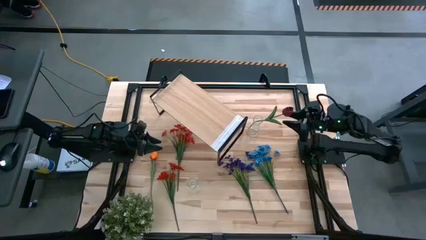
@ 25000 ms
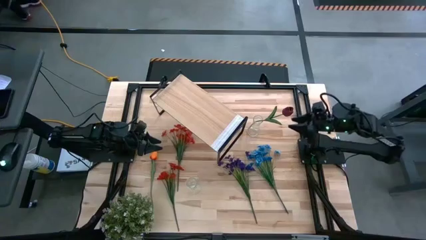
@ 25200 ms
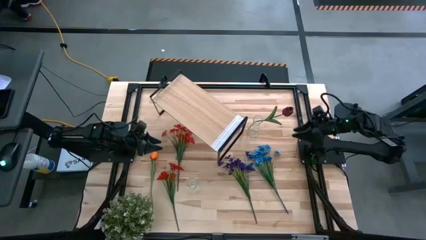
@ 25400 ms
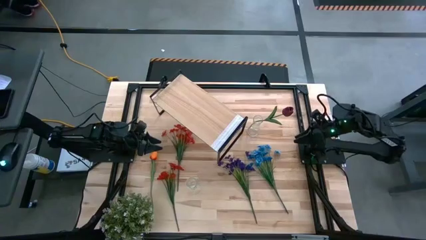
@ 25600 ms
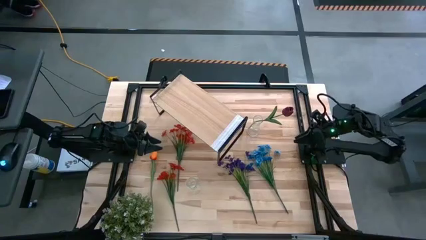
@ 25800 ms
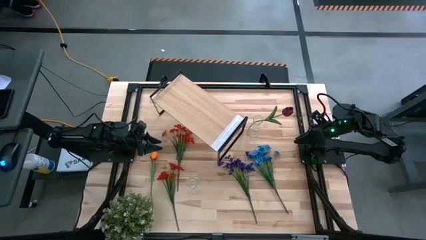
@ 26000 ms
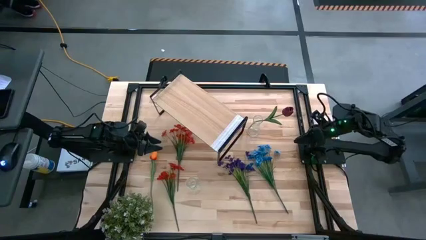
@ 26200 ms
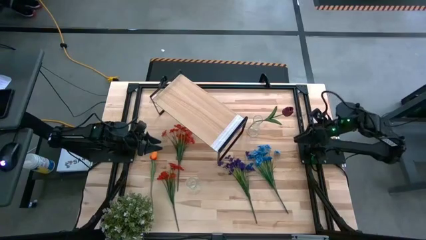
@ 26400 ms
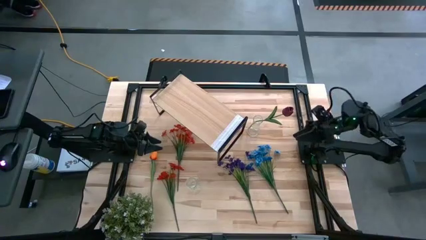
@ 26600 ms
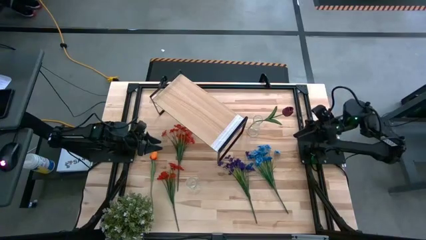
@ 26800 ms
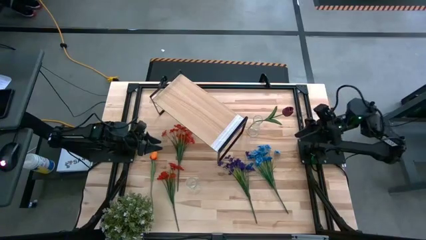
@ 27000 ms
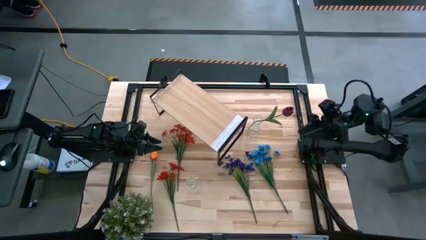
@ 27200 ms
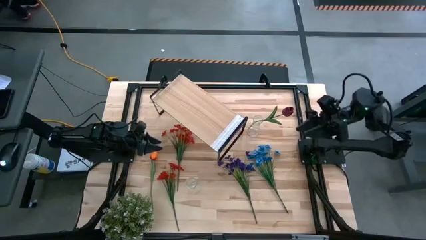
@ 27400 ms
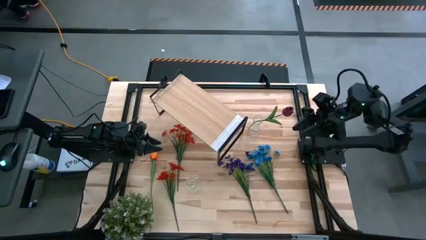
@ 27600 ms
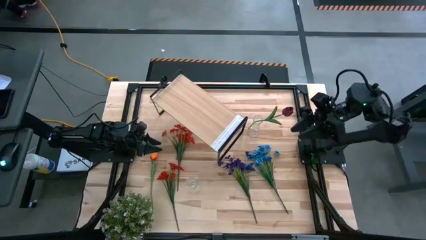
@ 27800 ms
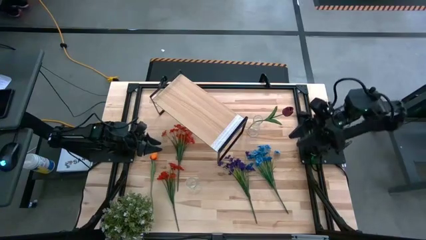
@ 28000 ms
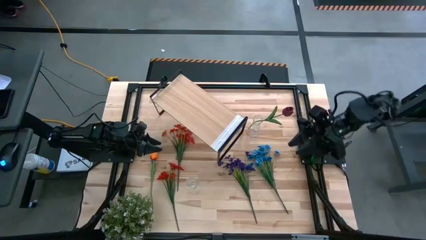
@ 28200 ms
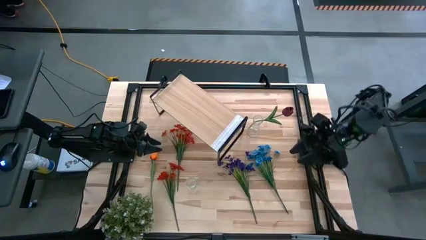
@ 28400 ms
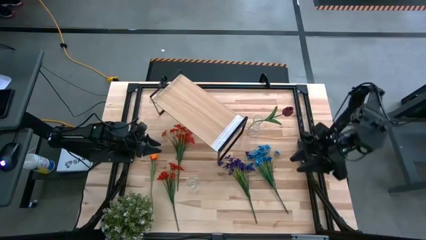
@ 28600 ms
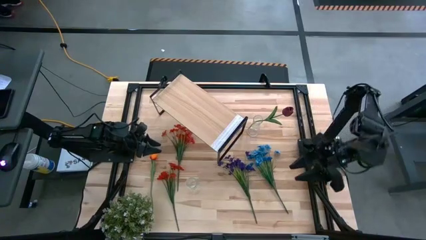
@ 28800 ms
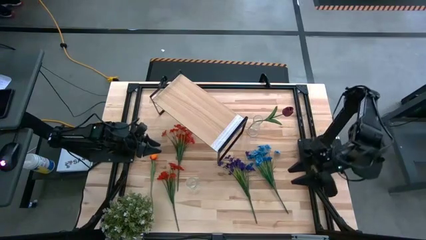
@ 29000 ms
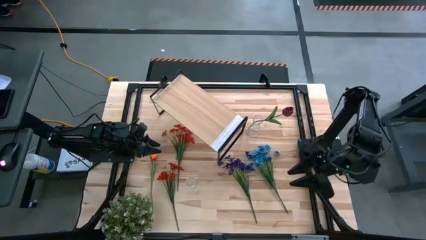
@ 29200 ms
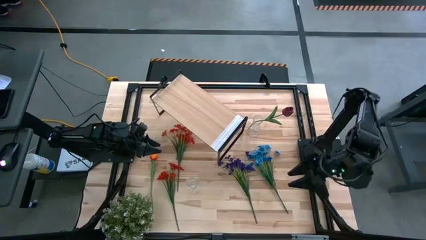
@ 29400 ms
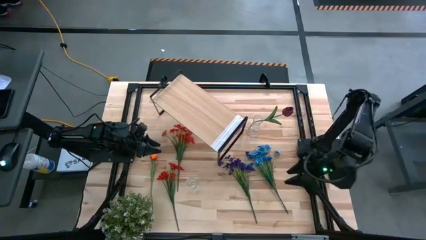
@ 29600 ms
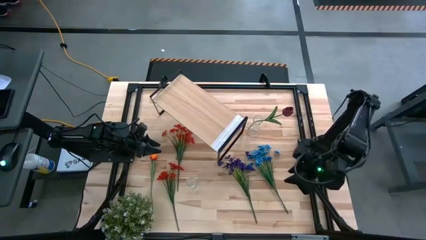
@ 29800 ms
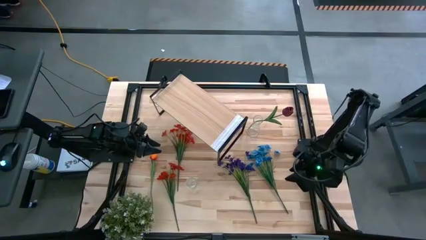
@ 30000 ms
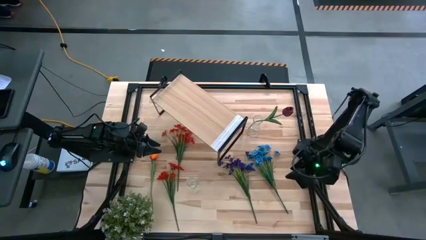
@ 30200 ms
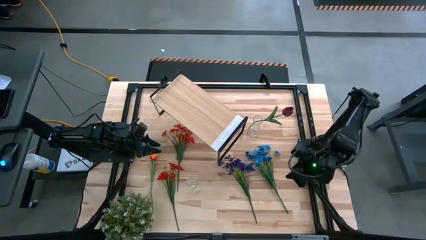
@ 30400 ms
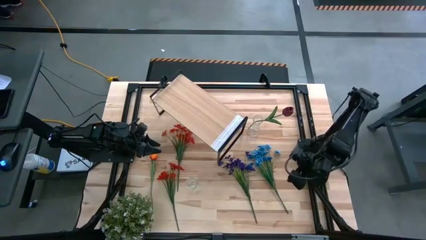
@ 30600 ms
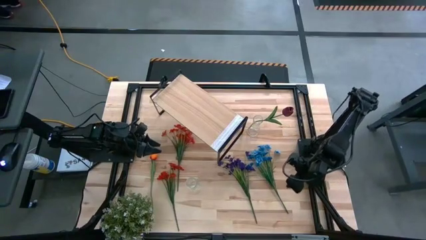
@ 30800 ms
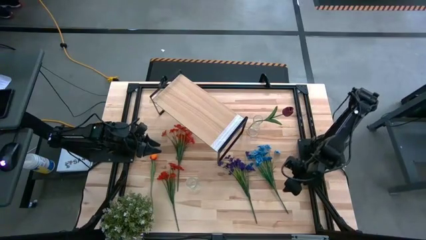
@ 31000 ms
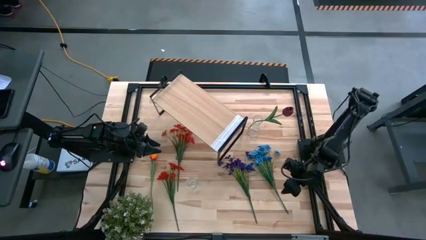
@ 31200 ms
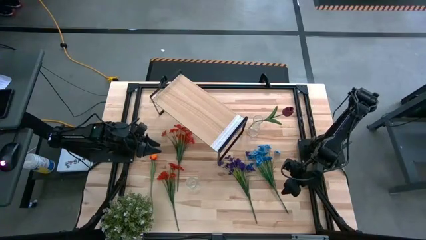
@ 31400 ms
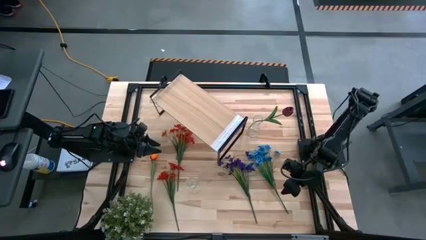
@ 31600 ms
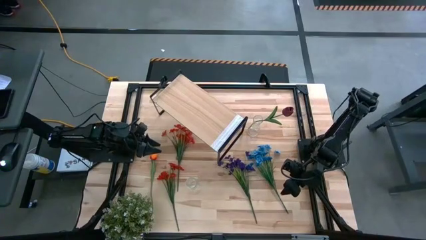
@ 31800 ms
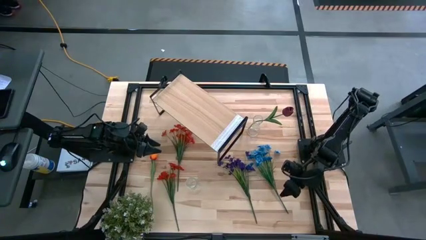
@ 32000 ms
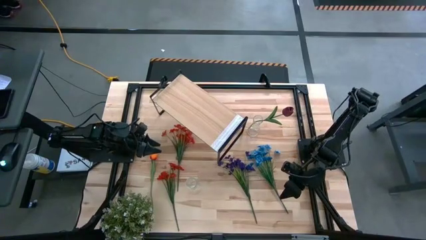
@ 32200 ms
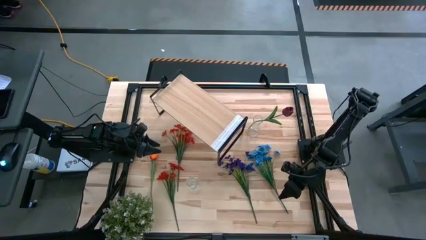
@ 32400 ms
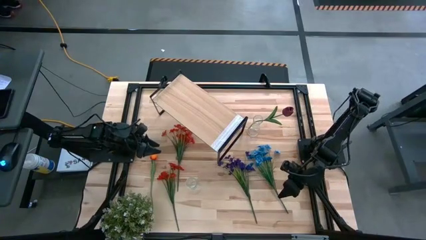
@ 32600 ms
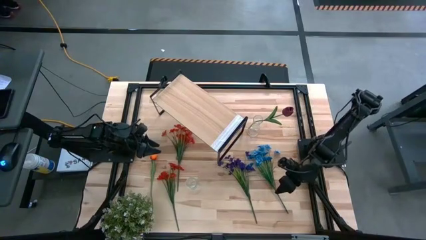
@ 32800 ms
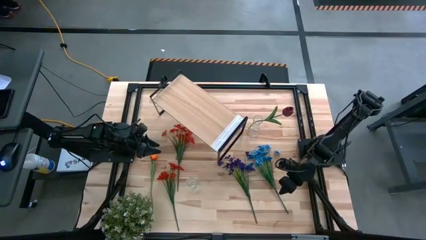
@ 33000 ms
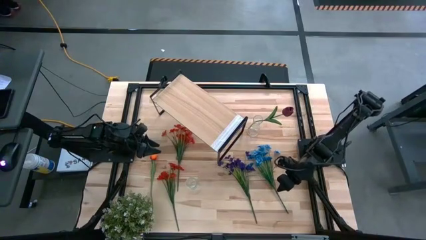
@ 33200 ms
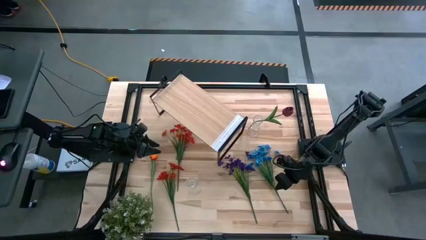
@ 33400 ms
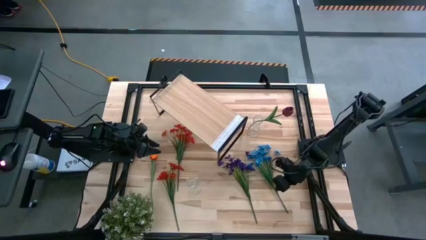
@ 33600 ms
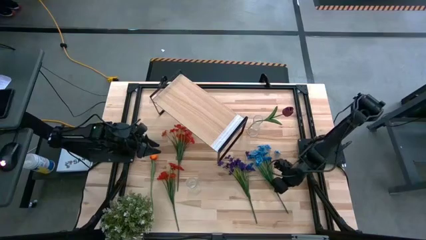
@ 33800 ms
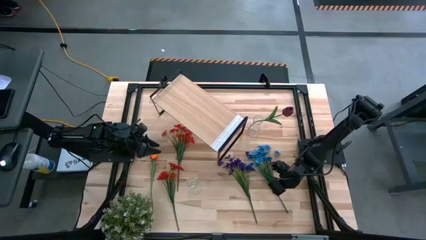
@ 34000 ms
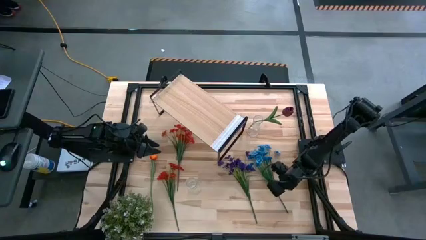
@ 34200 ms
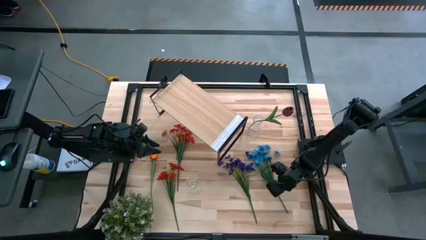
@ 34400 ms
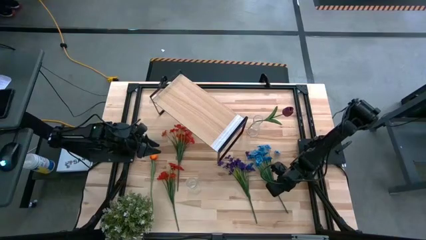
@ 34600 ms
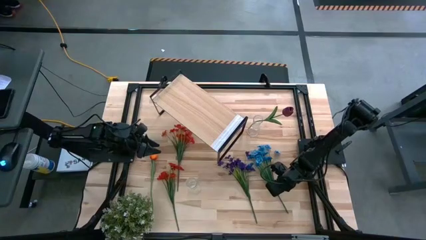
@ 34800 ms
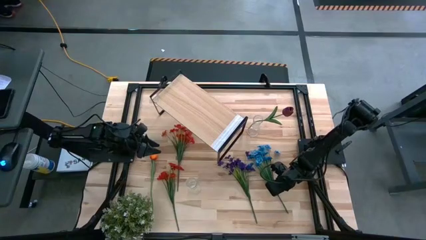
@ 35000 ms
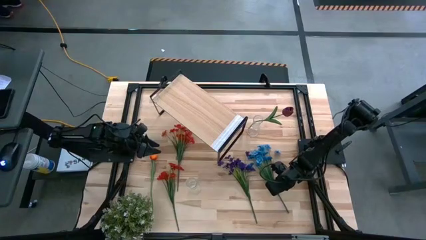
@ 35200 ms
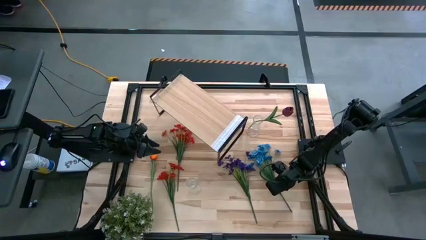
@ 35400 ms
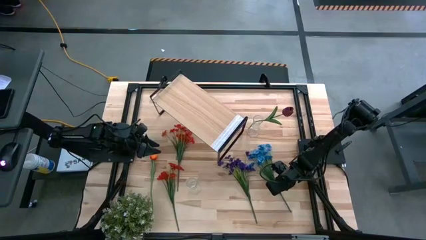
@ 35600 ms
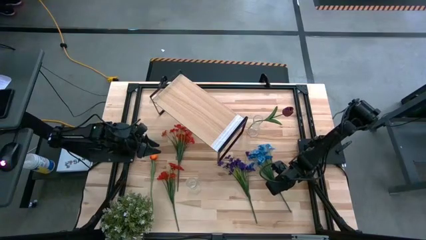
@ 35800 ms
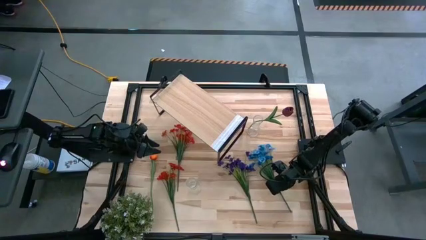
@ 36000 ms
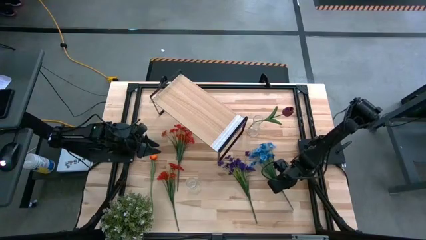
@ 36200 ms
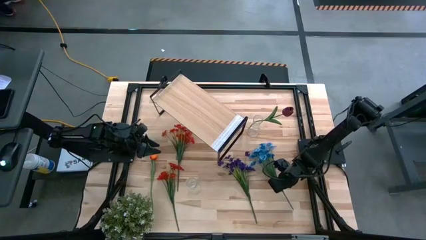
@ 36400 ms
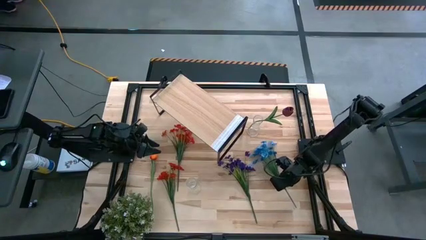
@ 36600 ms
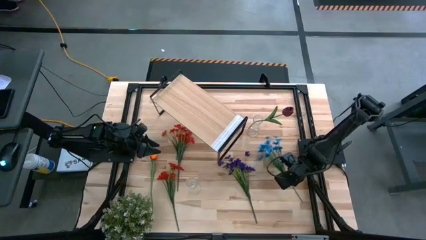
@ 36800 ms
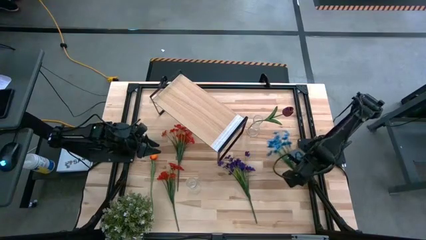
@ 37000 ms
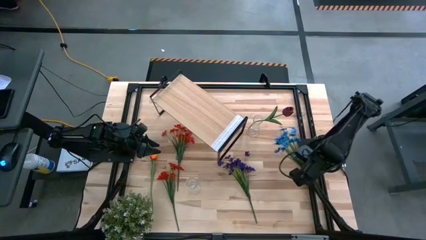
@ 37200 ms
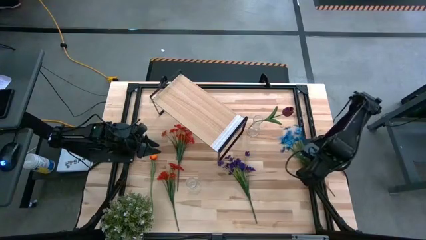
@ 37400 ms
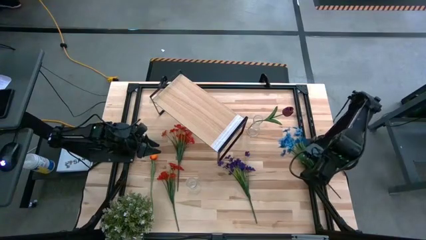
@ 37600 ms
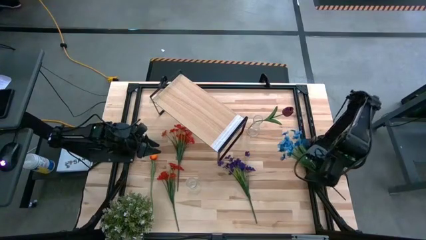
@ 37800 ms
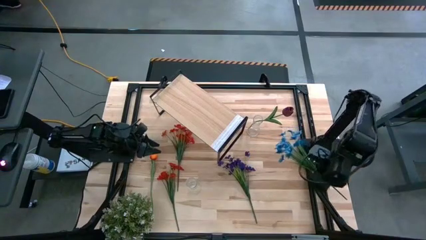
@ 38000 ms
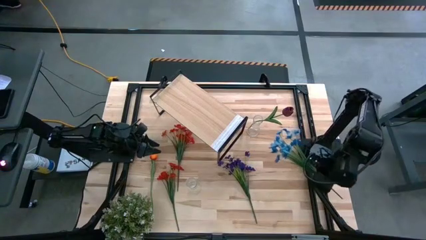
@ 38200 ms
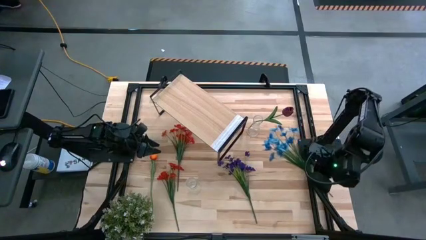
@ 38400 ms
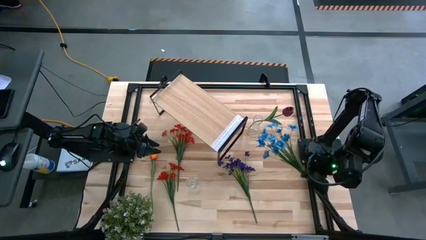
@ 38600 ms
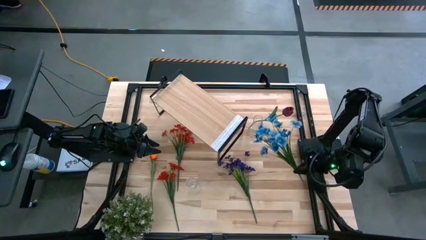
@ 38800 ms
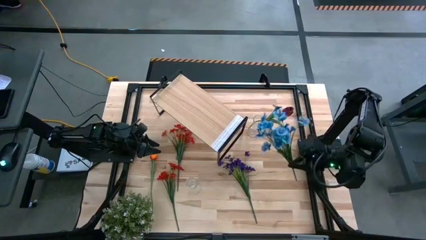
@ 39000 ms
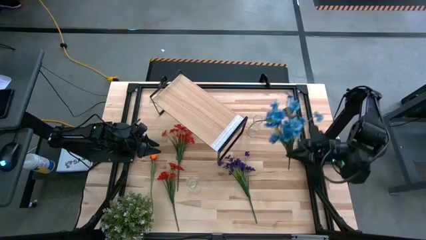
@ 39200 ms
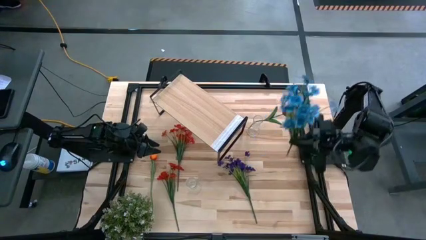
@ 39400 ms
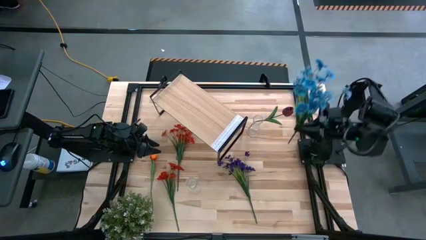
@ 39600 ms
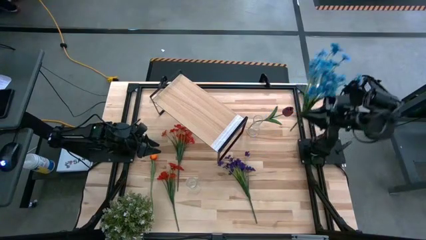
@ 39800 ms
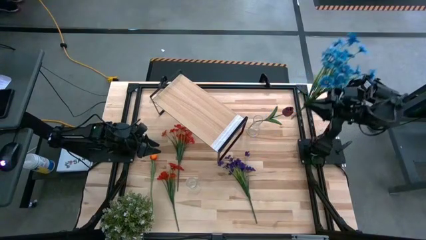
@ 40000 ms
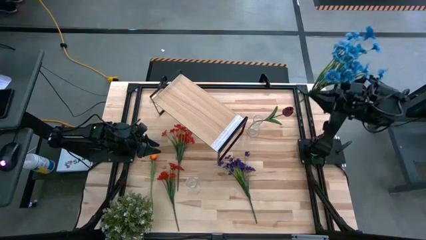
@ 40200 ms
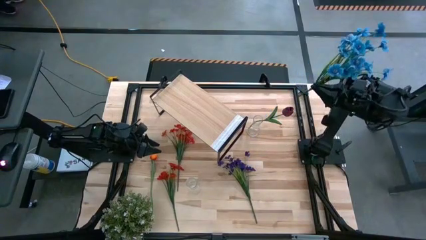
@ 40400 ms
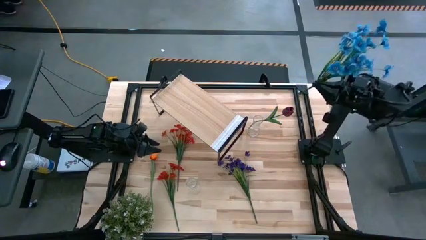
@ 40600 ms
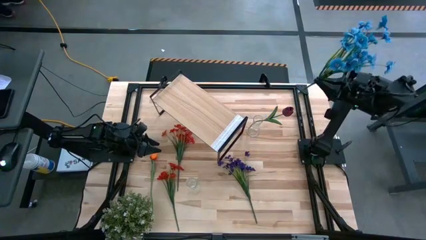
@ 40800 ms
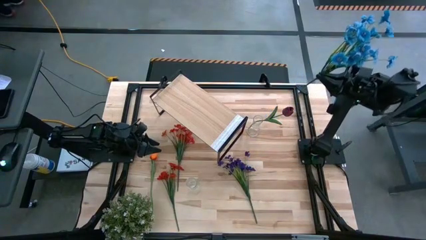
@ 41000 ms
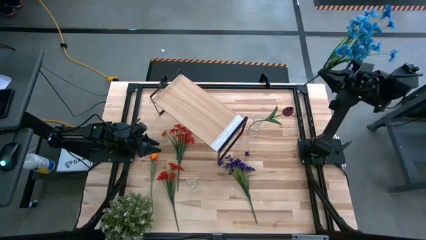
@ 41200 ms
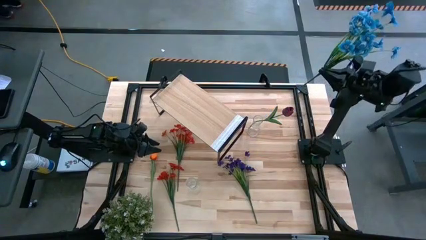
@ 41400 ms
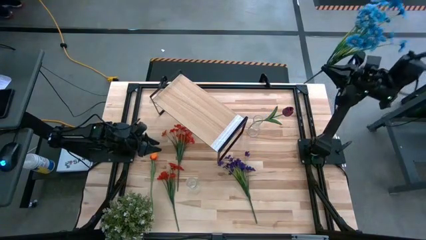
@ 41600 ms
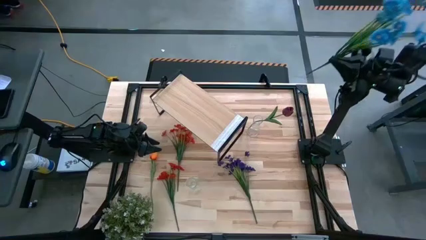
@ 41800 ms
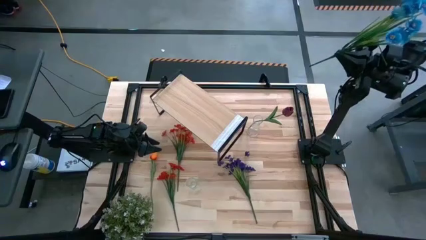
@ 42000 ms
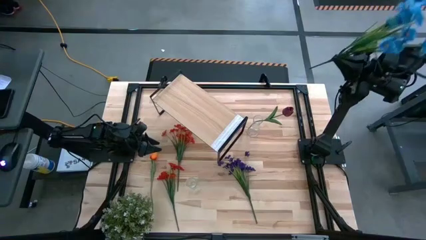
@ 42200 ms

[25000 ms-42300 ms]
Task: Pick and place flowers into a vace then onto a shelf
Put the blue flowers into the top transparent vase
